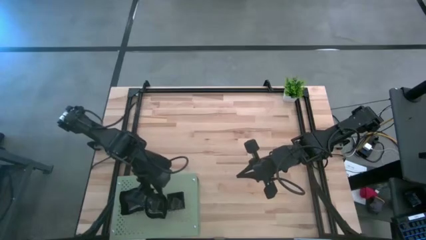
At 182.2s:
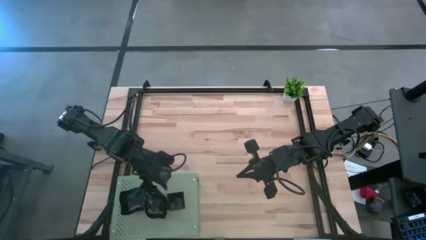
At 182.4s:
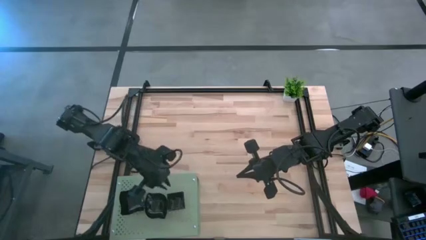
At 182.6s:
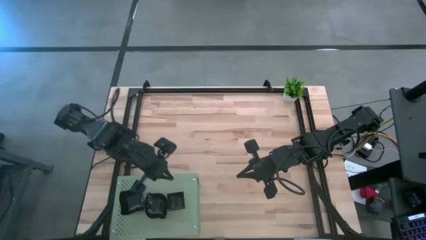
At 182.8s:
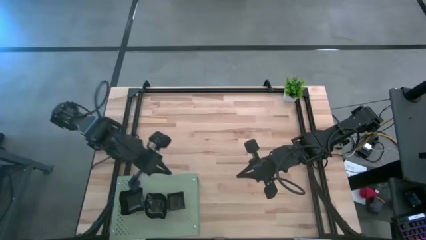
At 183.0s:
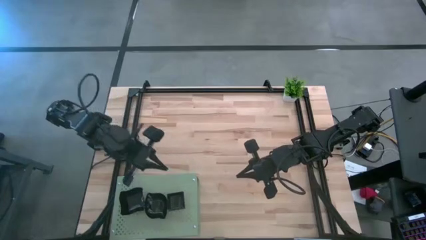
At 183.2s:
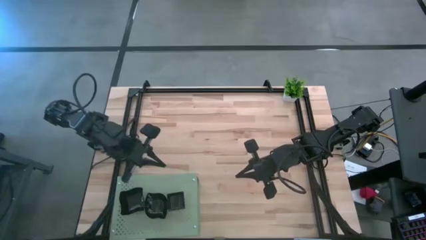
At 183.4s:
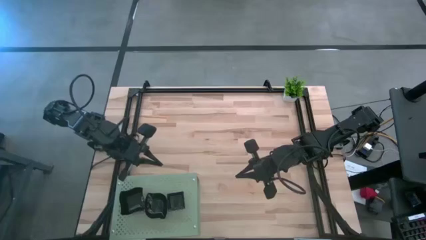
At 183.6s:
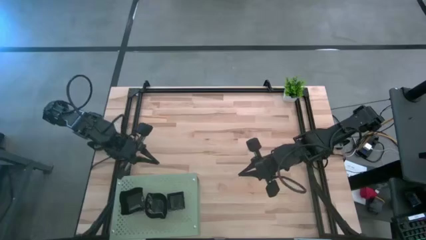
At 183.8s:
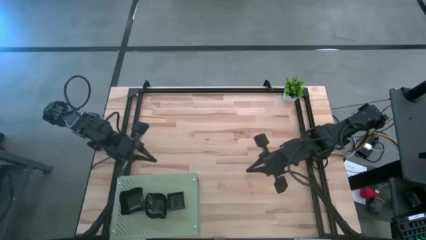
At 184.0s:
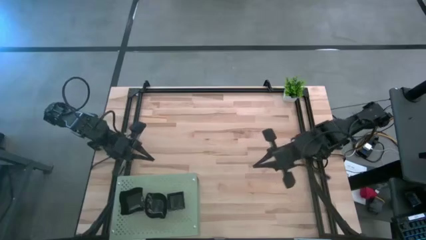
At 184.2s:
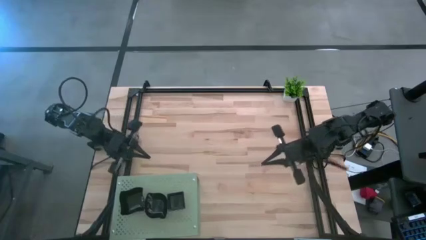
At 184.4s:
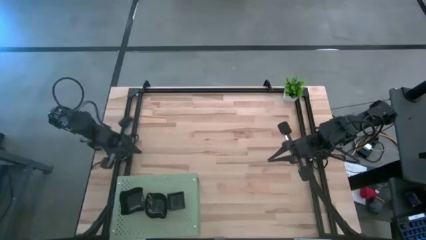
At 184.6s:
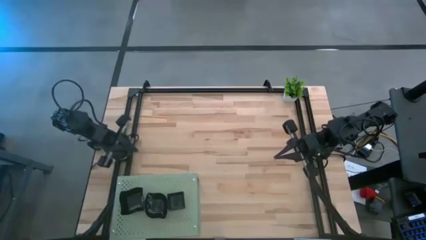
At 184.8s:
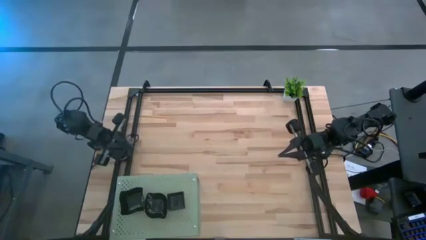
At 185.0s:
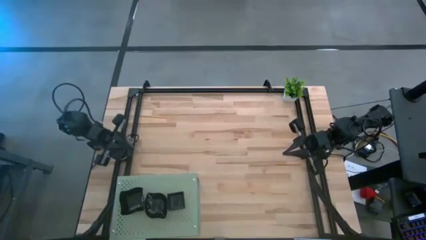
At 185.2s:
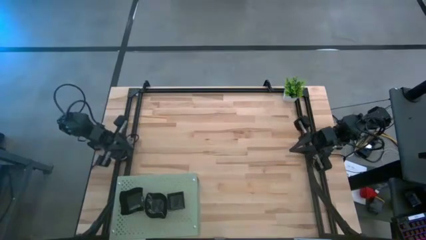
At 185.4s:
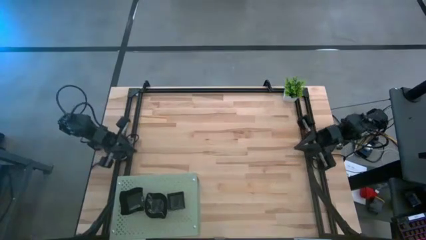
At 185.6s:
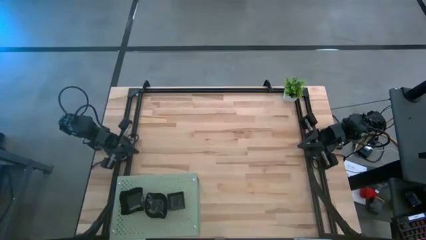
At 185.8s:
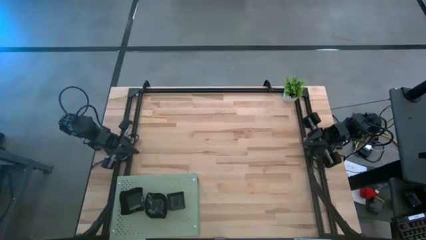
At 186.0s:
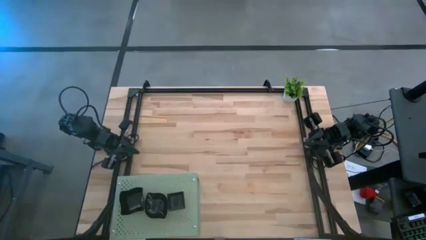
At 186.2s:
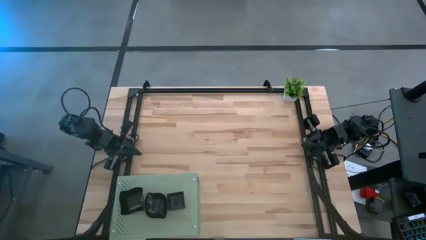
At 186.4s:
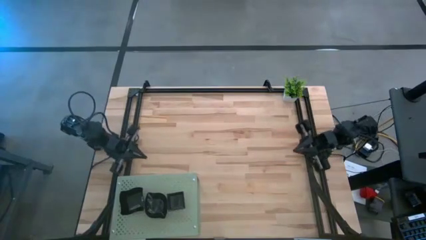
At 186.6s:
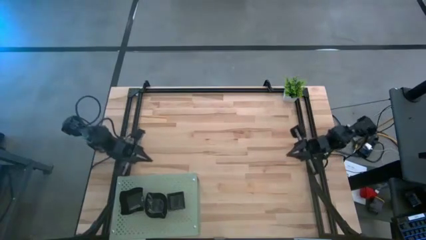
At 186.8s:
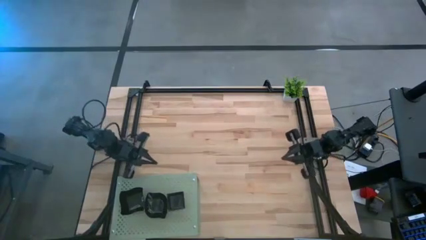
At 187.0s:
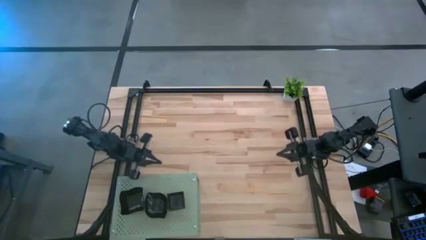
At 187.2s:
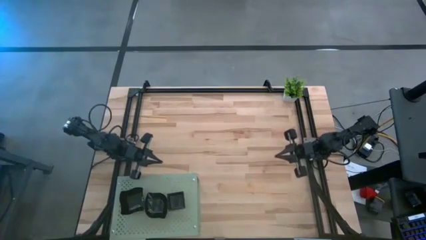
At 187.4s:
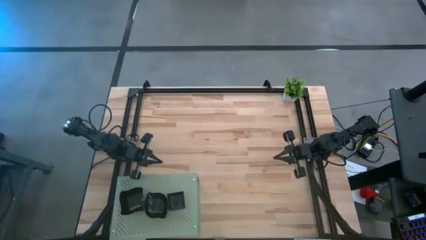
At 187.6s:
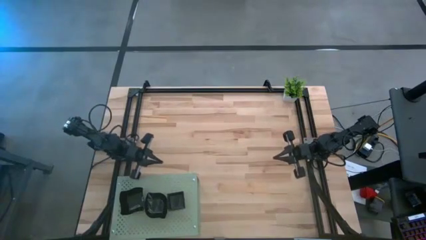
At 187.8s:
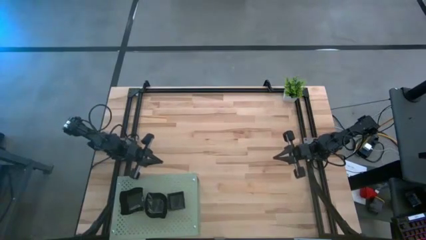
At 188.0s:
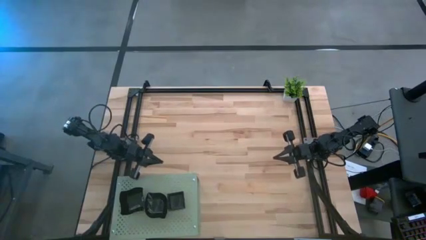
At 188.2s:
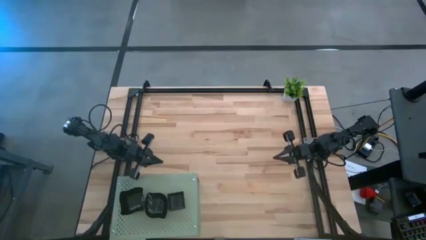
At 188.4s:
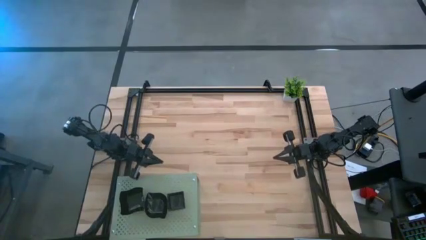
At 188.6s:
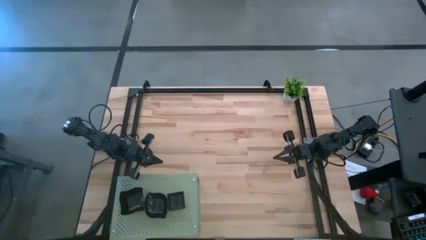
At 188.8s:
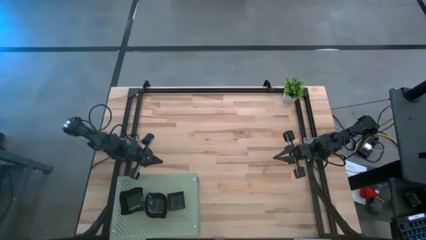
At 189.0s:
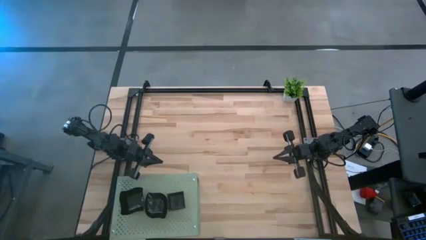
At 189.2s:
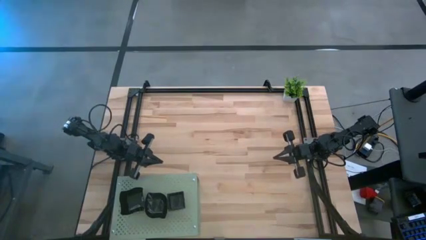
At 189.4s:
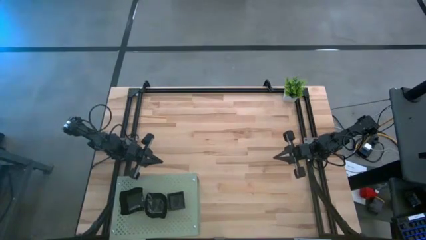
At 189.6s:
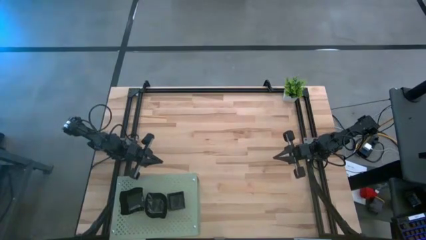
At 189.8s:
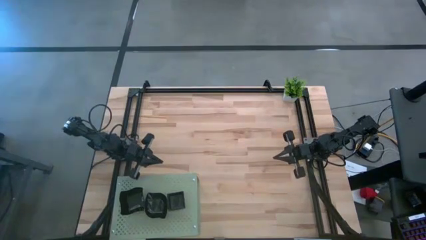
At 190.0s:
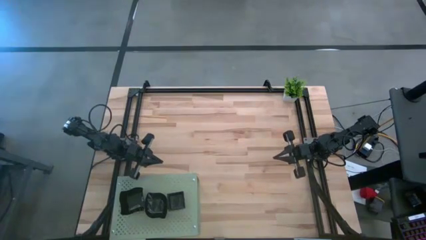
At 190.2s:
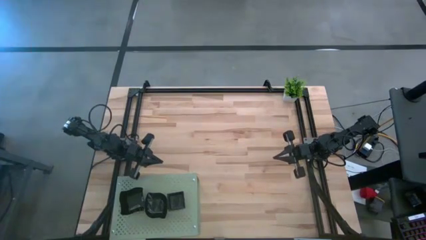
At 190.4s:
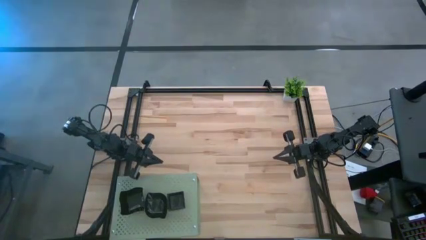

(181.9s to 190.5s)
Task: Pick & Place Mini shaped plates
Return to Home Position

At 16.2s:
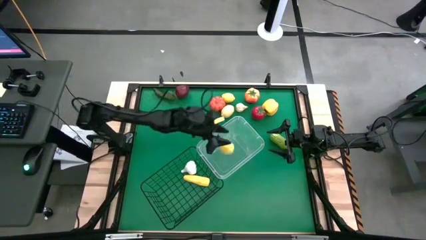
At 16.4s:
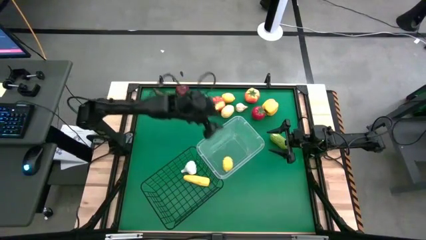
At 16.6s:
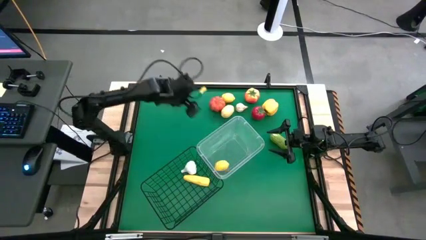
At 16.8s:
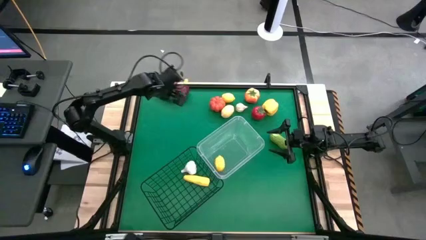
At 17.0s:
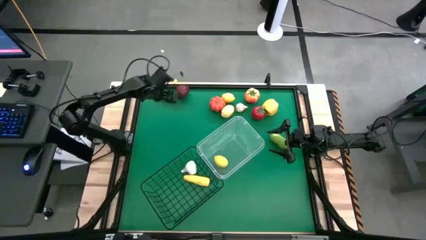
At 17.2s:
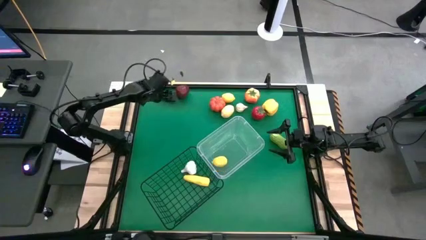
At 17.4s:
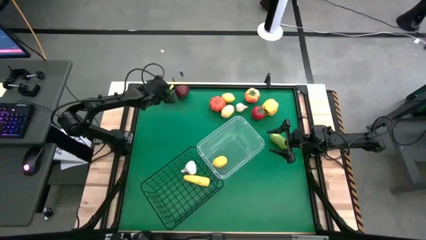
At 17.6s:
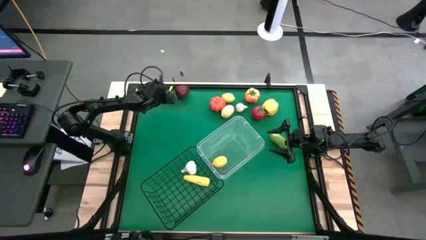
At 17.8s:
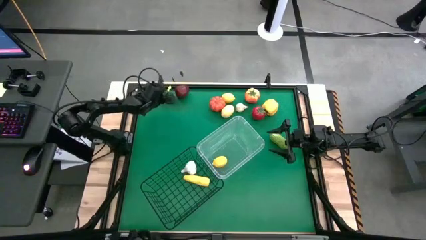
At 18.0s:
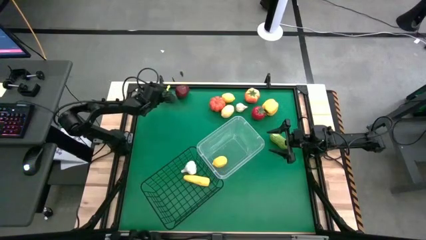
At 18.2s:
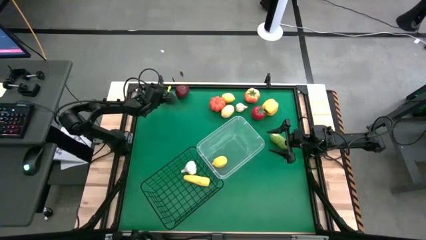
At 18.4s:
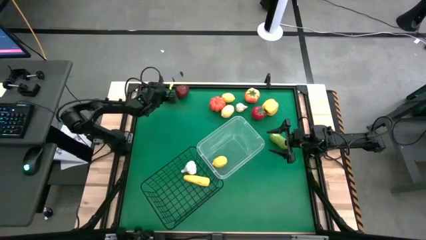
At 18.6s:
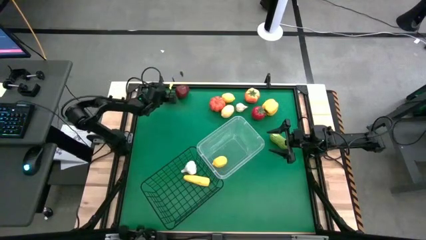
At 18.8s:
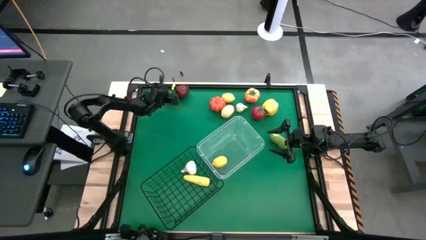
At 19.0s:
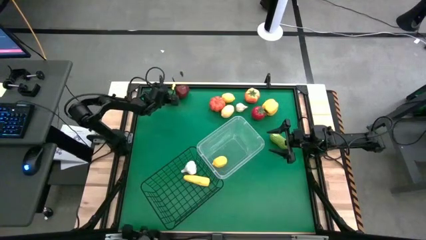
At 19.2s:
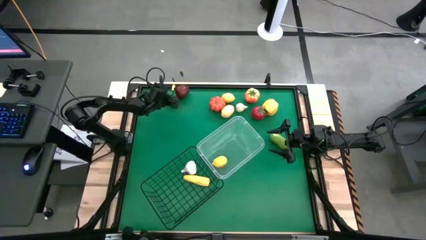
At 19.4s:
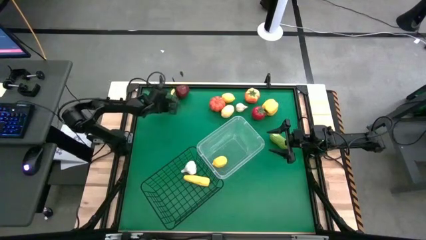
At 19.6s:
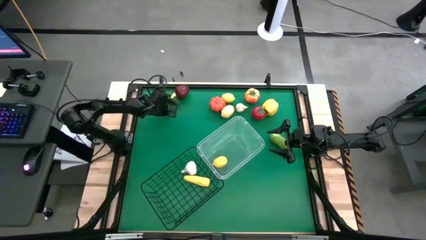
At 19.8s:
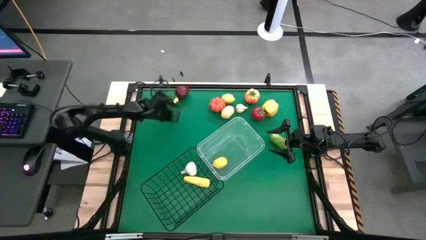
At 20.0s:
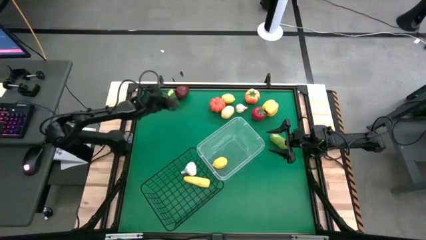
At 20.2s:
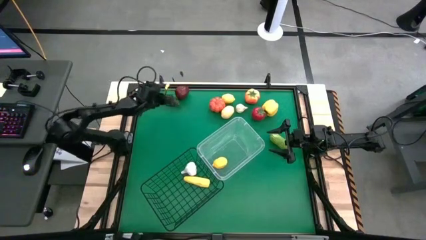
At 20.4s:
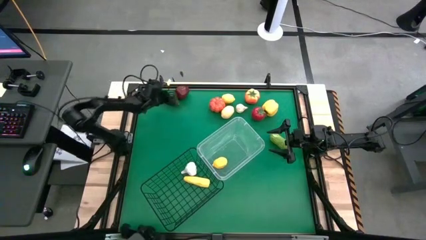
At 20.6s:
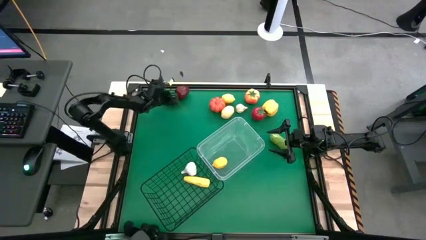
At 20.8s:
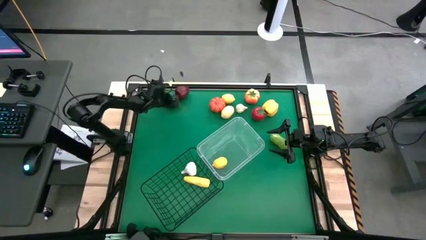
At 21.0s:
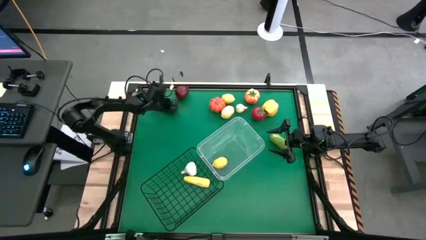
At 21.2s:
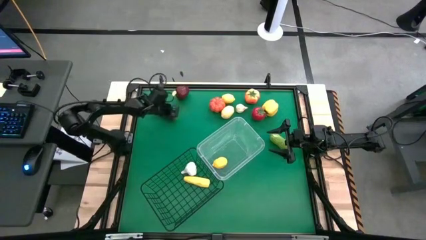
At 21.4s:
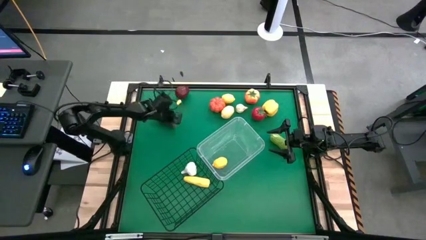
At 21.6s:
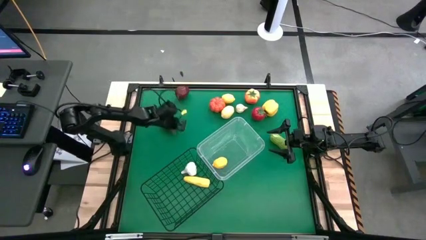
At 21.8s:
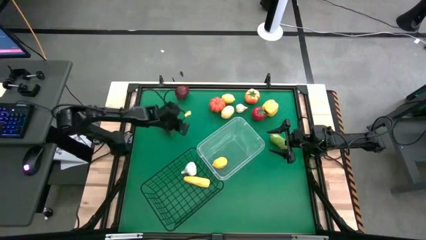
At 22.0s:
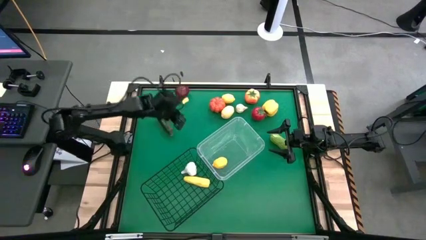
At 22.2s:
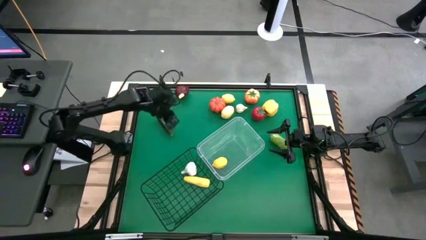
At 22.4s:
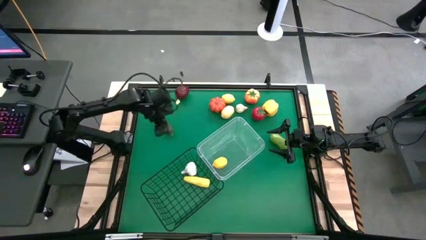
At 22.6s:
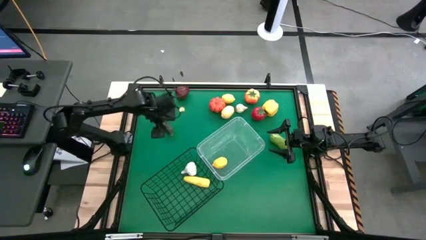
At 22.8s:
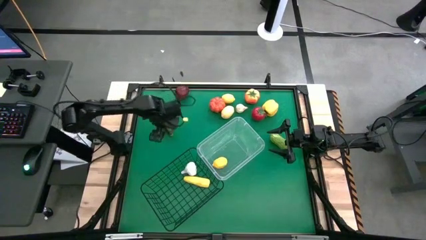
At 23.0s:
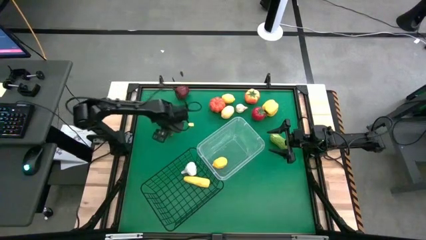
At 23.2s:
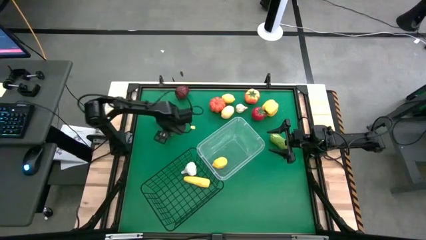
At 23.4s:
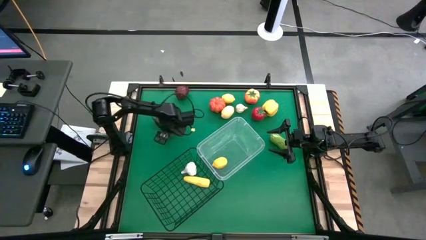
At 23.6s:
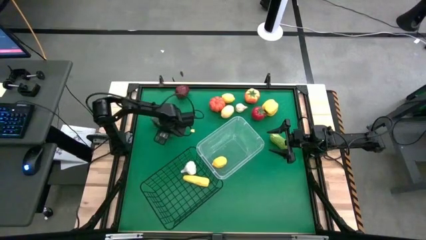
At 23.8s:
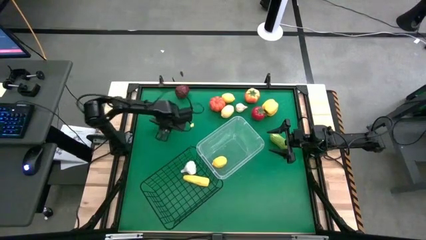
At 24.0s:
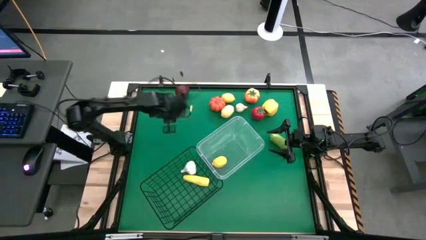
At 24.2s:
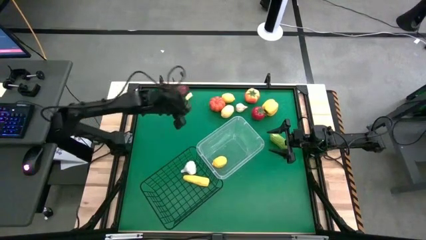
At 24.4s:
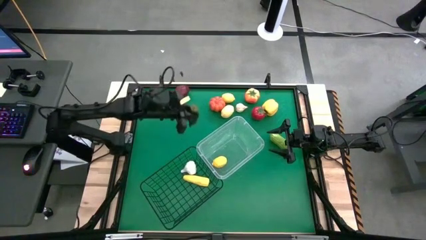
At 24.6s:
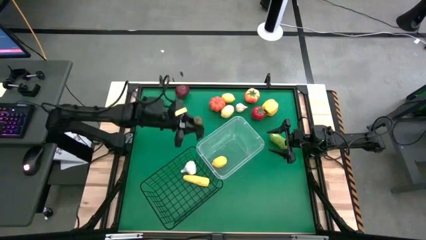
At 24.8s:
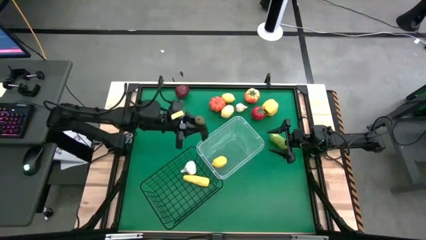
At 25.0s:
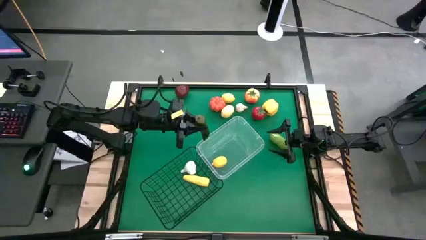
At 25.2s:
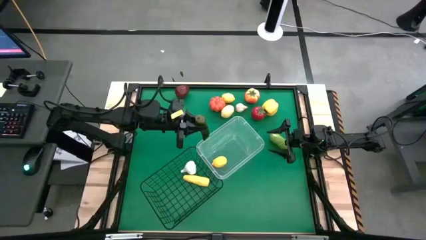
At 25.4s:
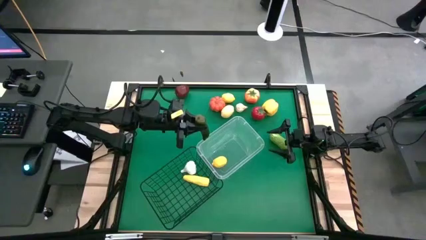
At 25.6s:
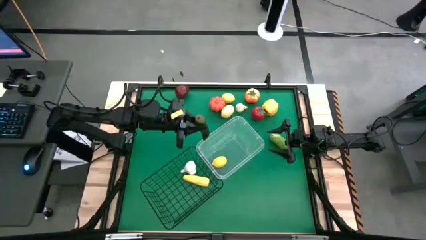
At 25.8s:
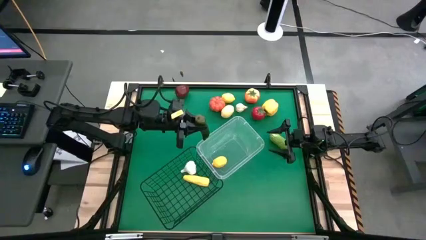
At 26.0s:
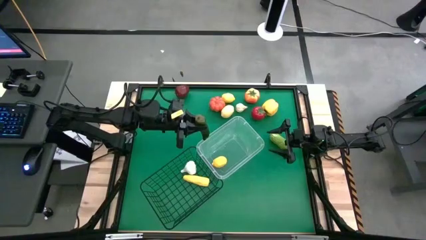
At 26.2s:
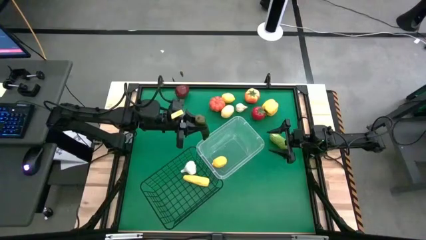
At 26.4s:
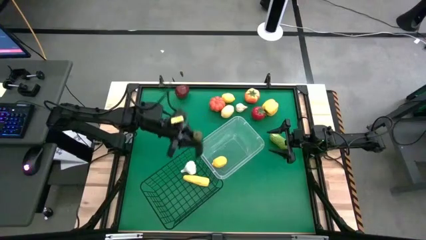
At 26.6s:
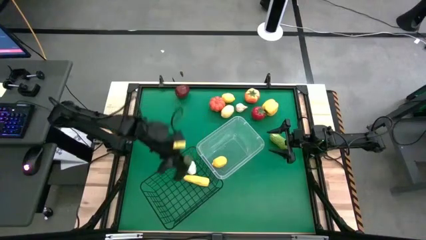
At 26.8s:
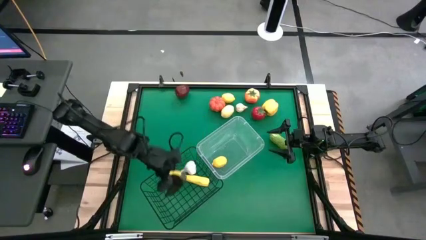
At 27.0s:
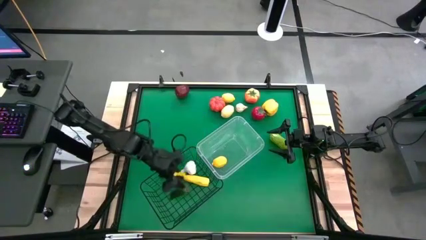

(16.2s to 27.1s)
Task: Sort produce into baskets
Put the green chili pepper into the wire basket
